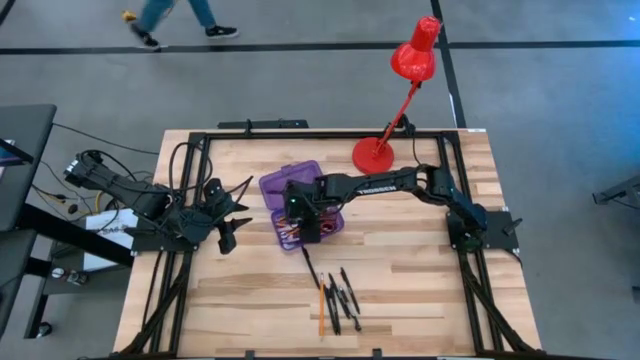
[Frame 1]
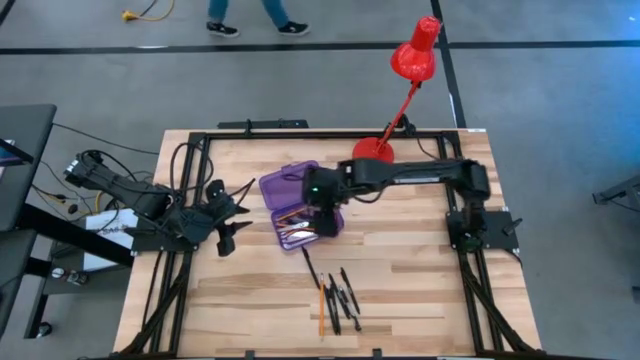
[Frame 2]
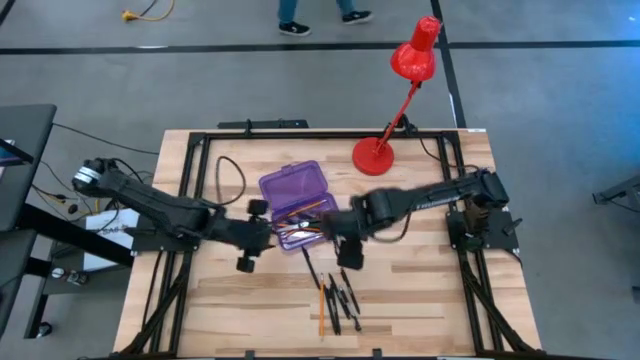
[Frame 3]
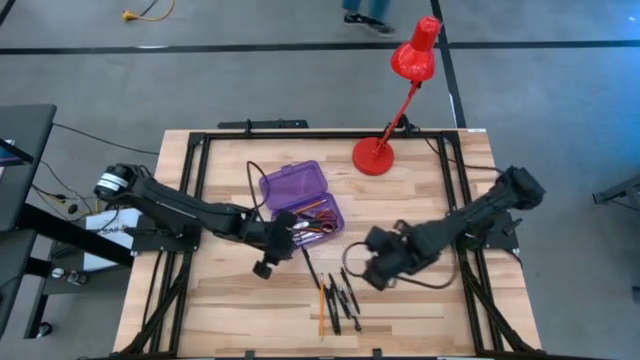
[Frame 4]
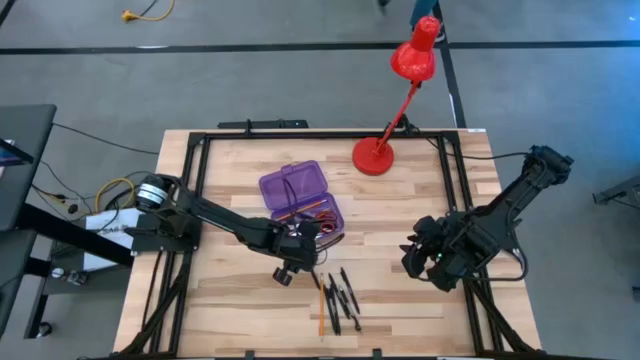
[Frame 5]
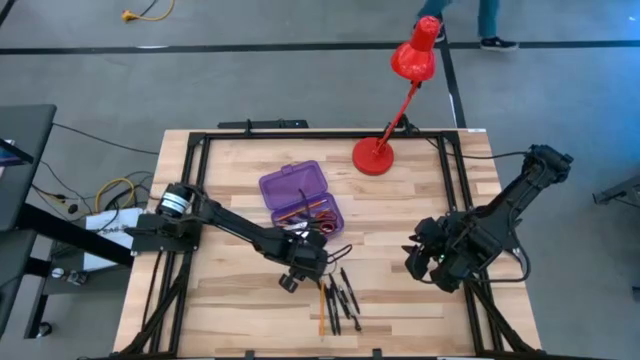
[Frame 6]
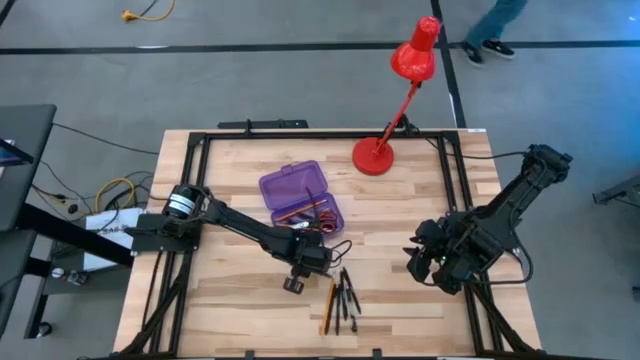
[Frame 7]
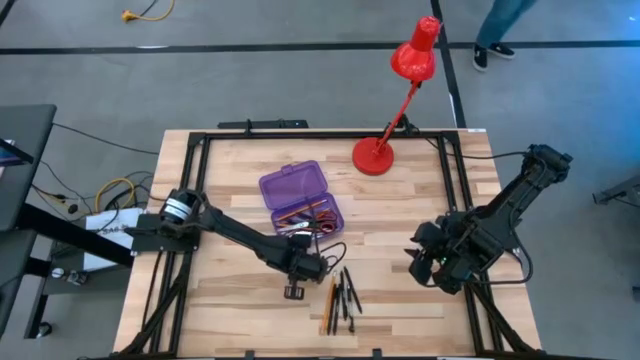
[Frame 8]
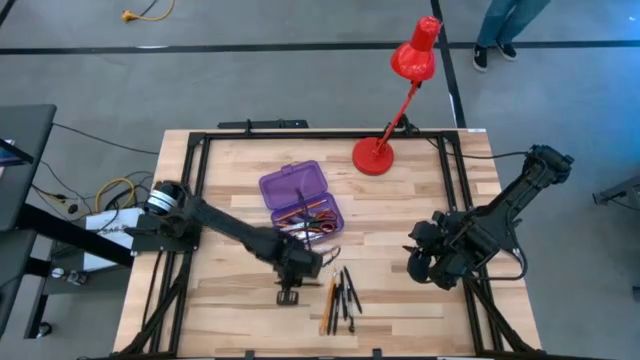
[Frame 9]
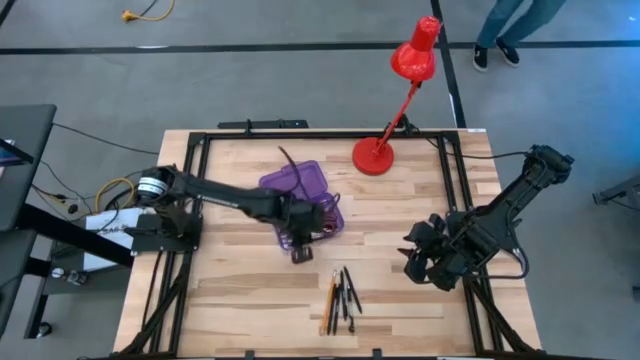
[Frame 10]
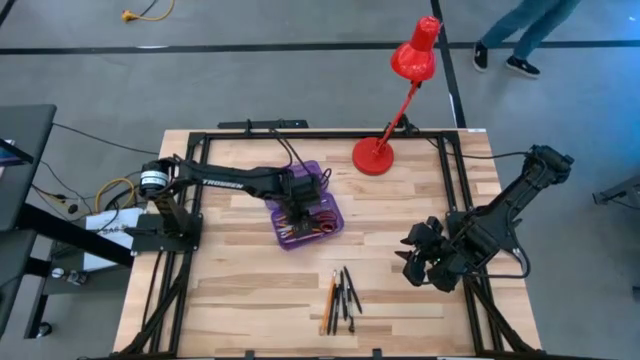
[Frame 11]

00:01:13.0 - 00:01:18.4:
Task: Pick & place school supplies into a supply box
Put the black pen into the purple supply box

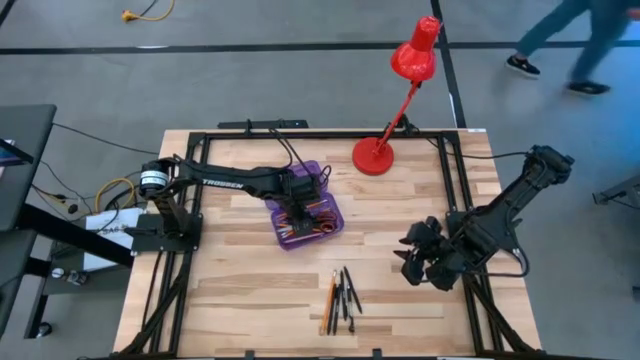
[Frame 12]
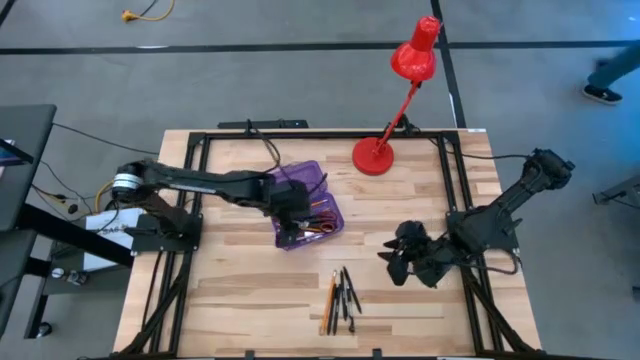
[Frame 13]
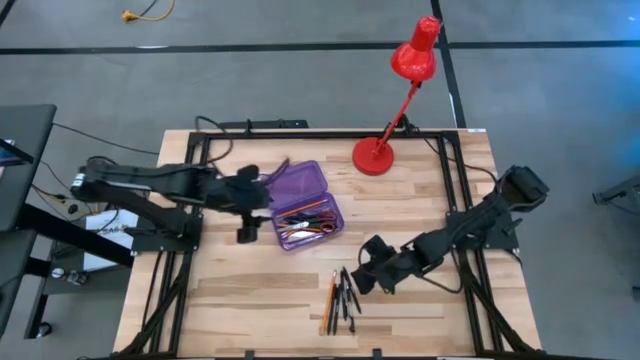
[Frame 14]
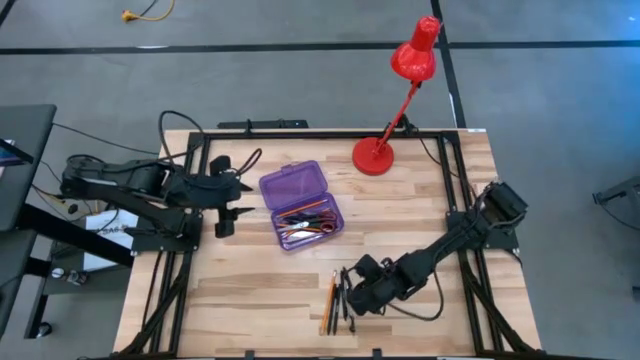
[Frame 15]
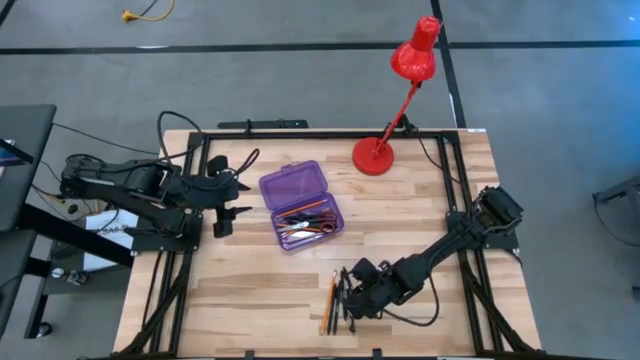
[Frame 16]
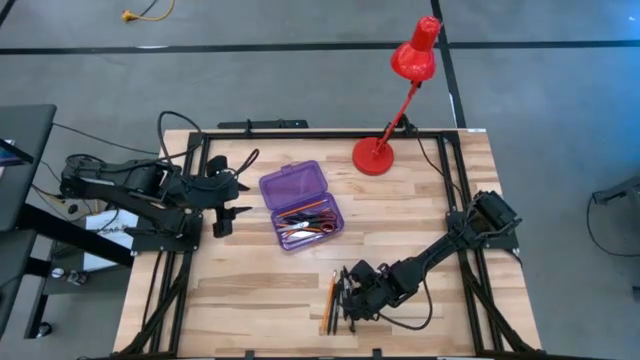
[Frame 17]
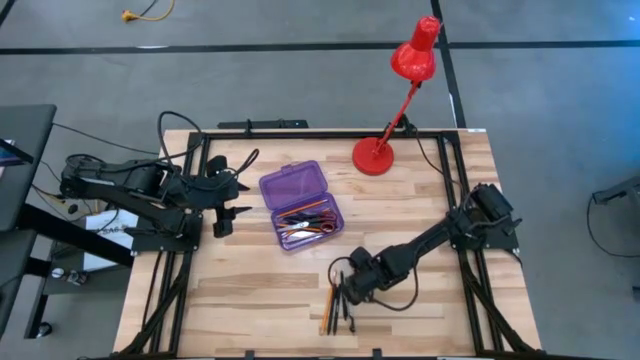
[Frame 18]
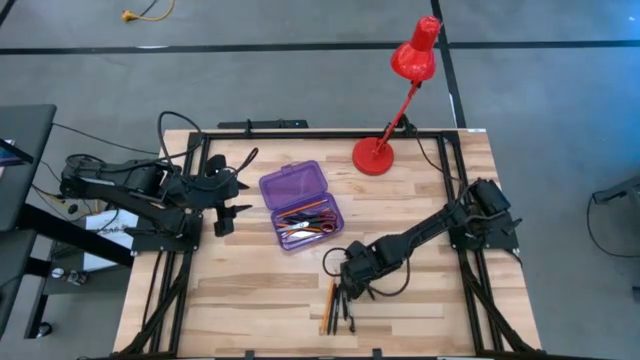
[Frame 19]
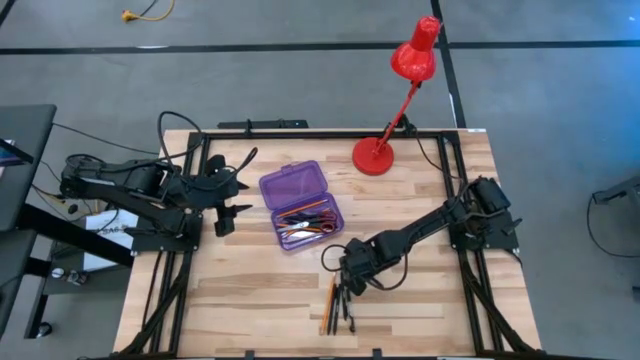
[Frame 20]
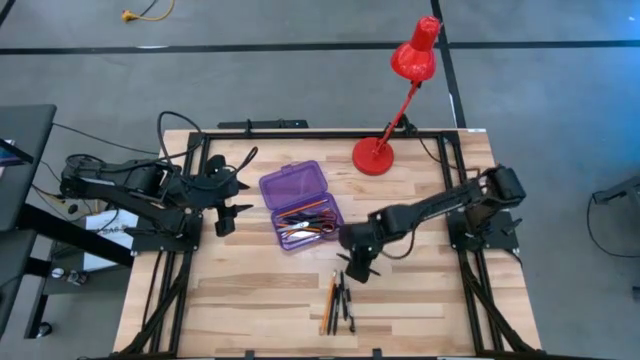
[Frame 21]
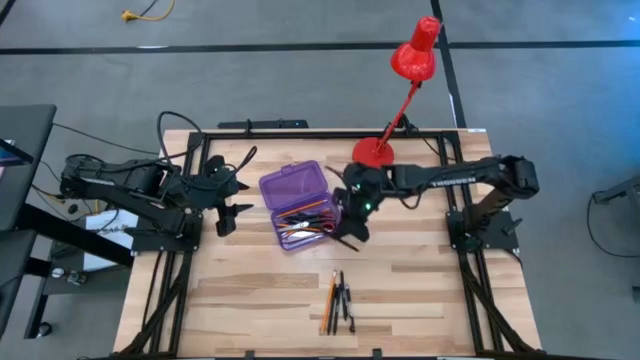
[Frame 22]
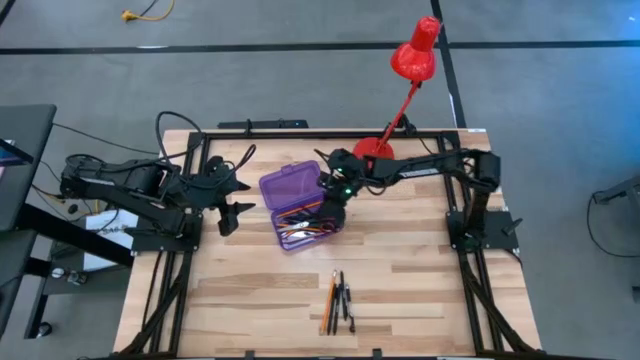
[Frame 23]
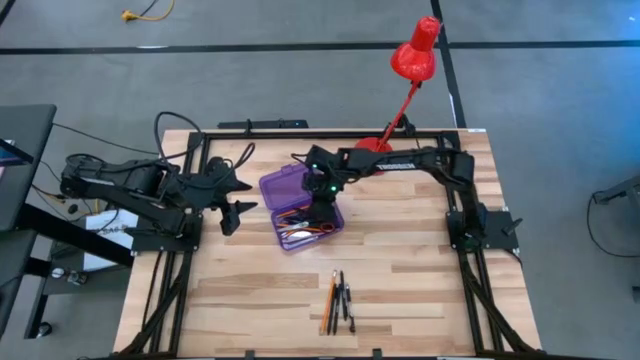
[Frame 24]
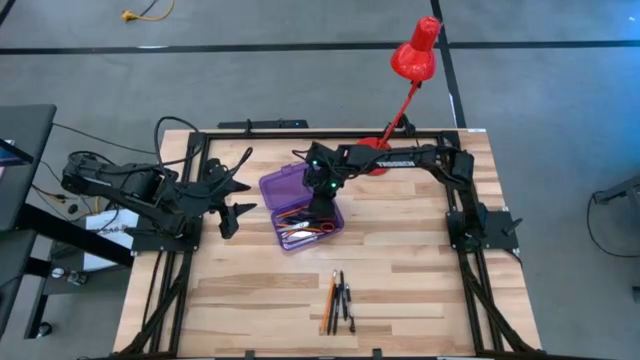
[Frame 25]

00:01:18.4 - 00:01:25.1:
Put the black pen into the purple supply box

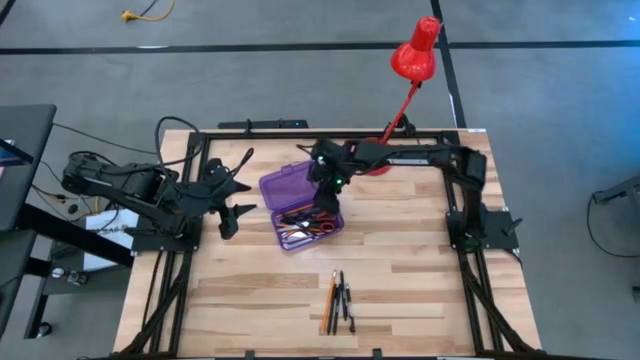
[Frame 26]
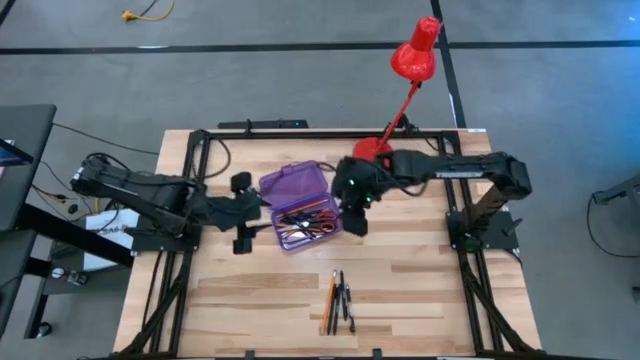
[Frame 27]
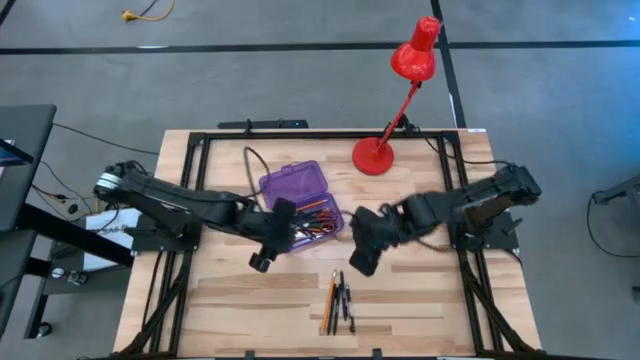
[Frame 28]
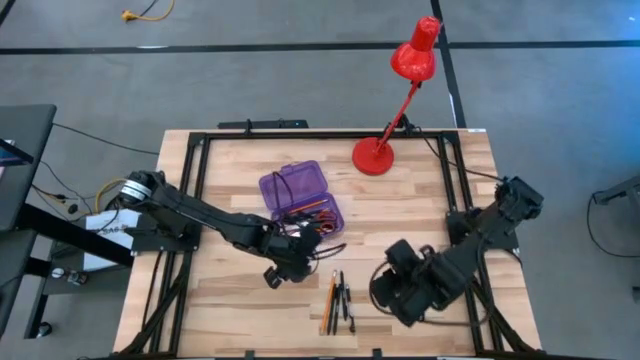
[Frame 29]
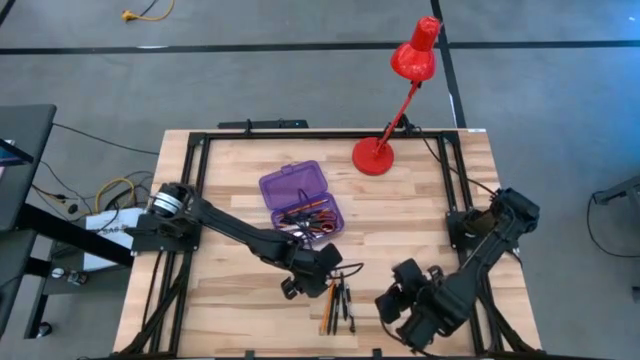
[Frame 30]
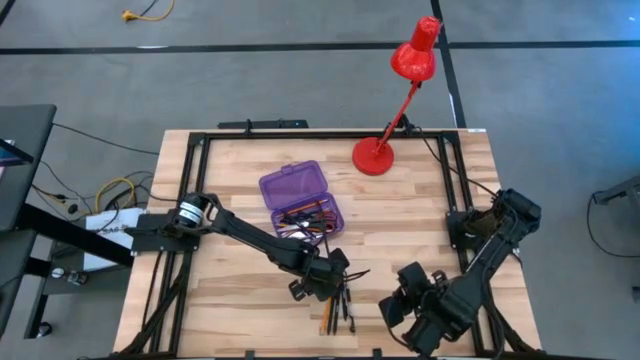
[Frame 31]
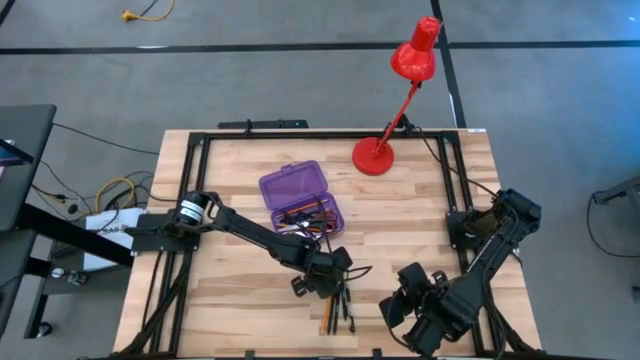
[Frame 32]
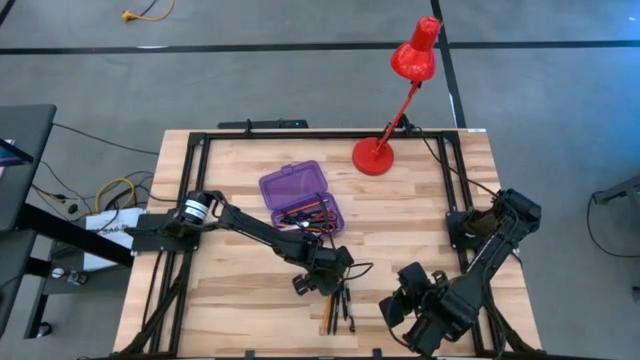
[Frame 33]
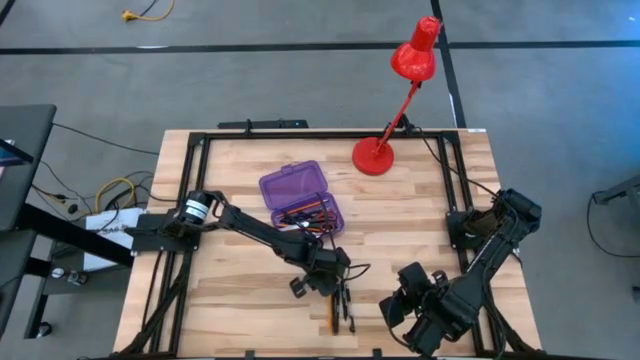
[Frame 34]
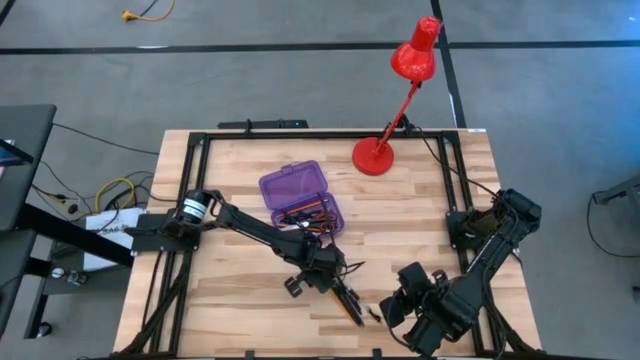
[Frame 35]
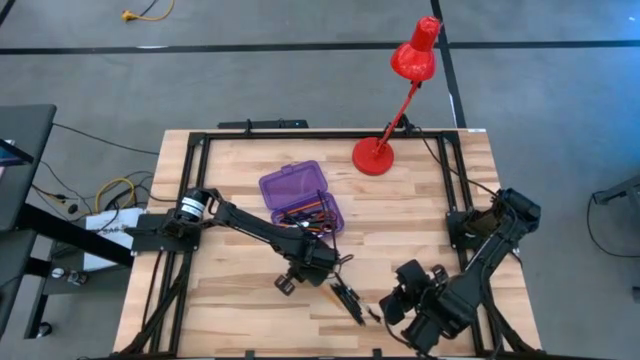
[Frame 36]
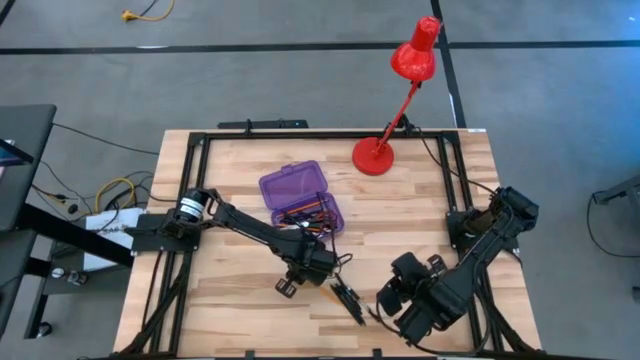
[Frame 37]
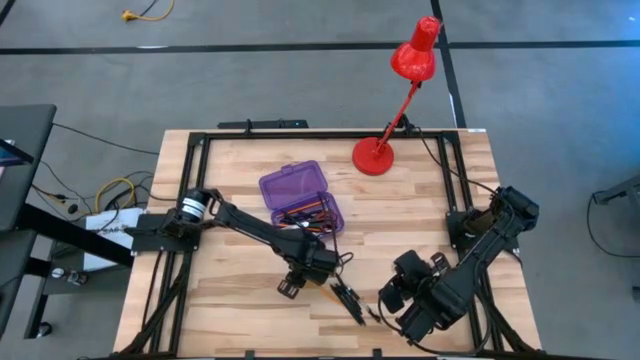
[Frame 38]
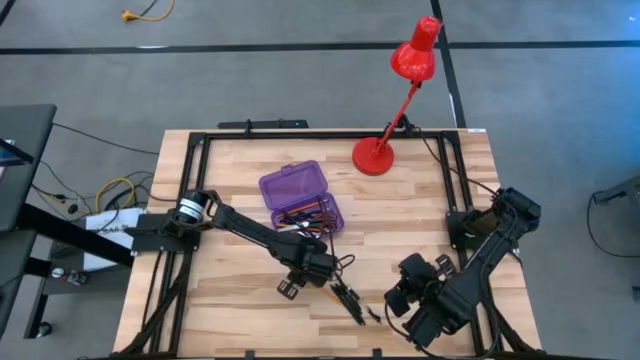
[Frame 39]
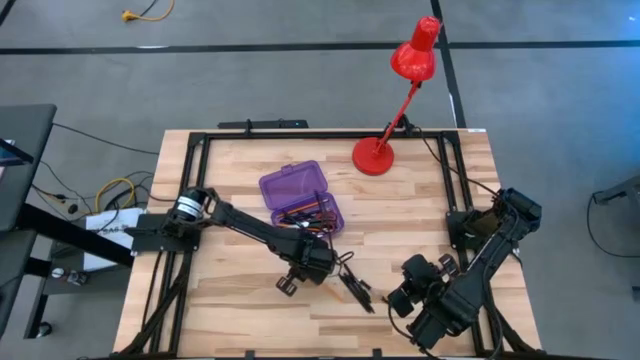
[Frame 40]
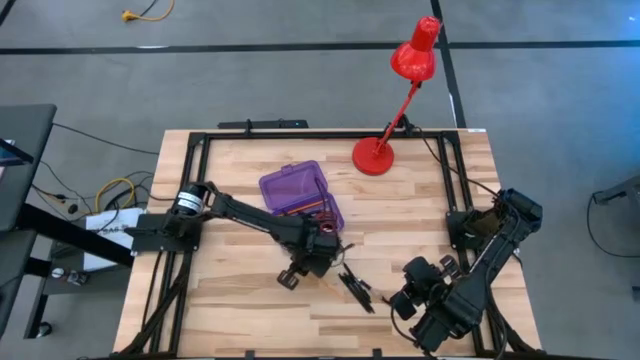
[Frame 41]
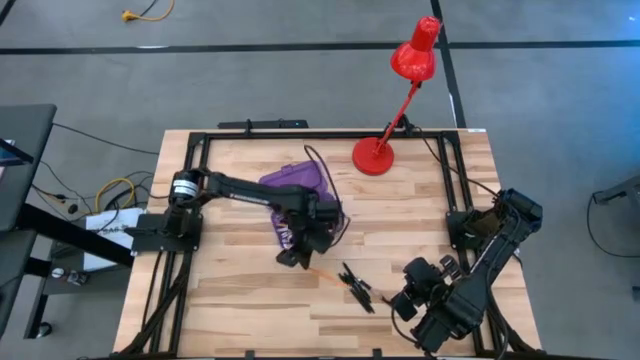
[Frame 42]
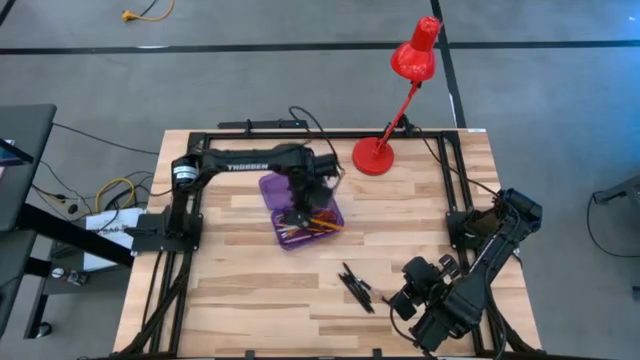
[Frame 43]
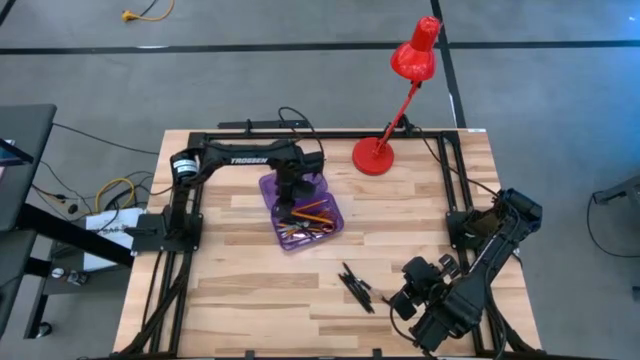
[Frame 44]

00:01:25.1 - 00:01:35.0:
Put the orange pencil into the purple supply box
